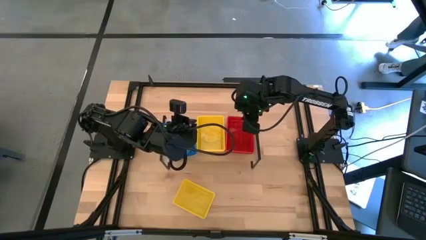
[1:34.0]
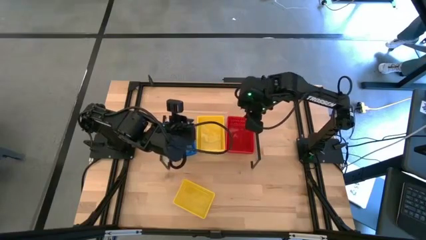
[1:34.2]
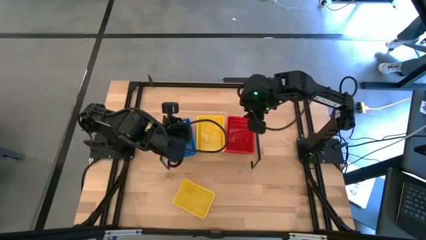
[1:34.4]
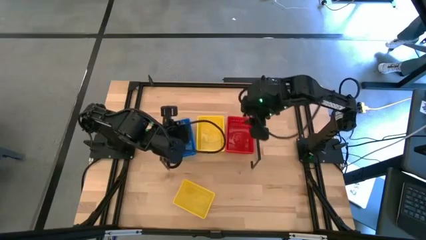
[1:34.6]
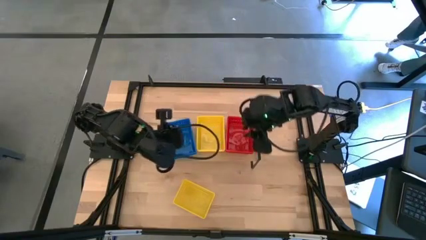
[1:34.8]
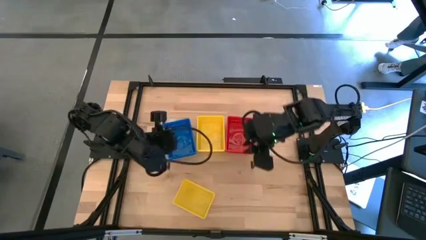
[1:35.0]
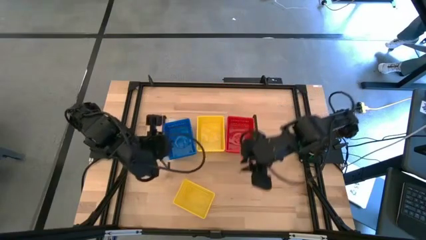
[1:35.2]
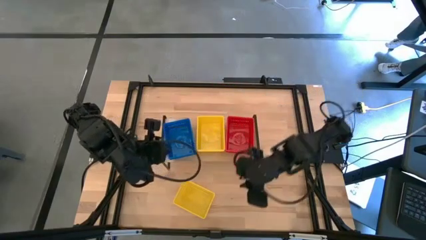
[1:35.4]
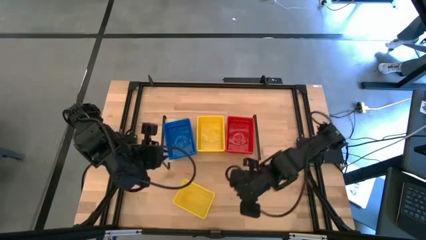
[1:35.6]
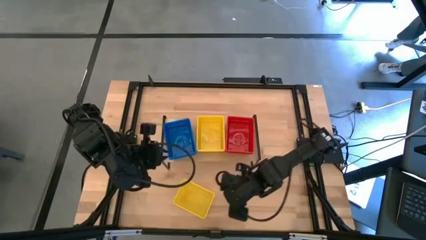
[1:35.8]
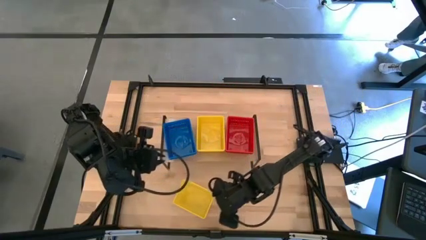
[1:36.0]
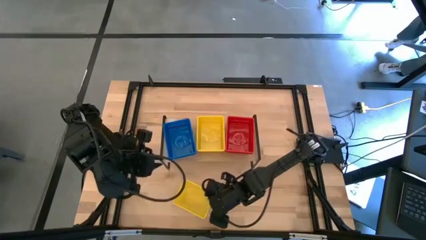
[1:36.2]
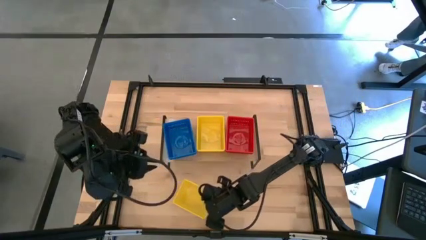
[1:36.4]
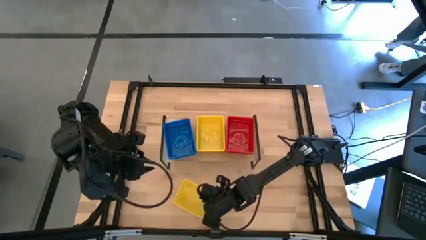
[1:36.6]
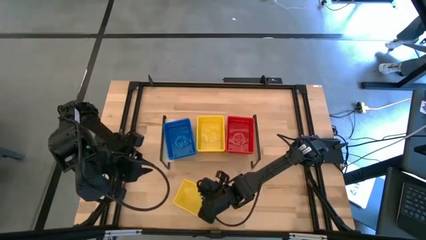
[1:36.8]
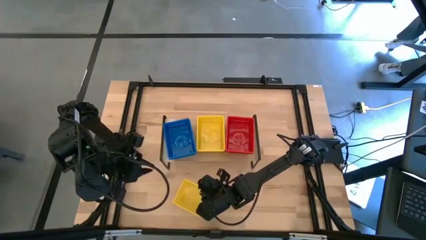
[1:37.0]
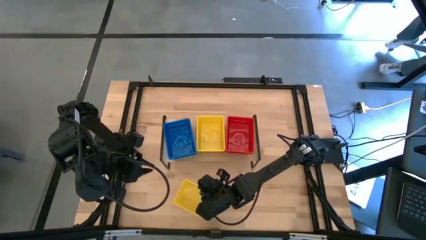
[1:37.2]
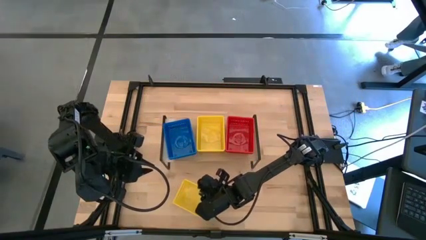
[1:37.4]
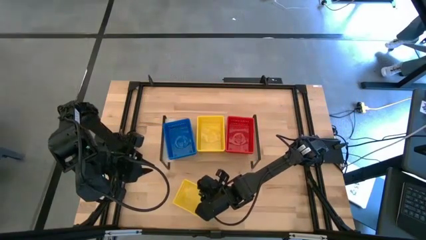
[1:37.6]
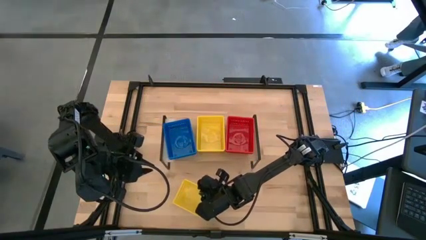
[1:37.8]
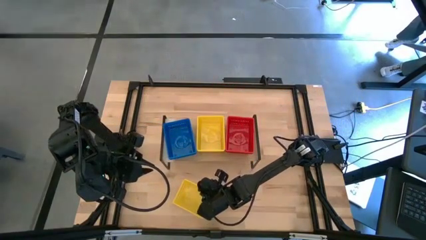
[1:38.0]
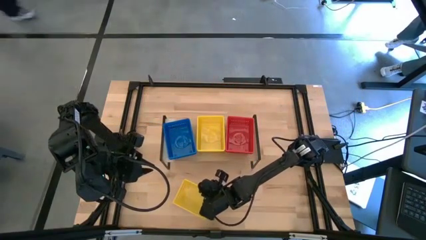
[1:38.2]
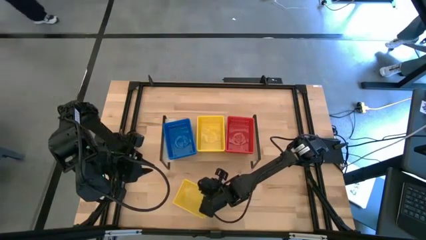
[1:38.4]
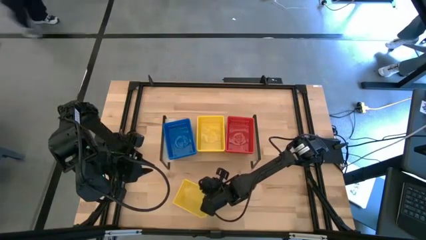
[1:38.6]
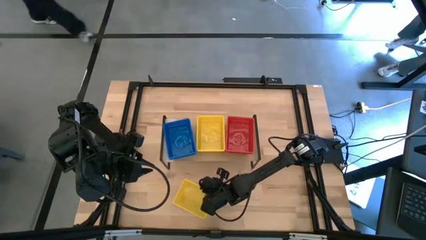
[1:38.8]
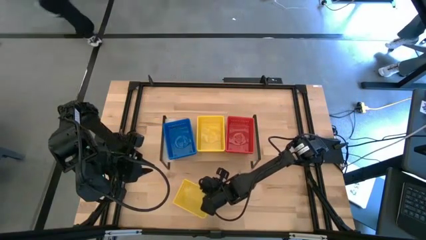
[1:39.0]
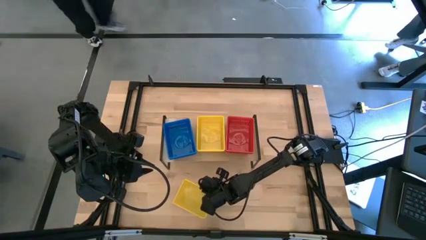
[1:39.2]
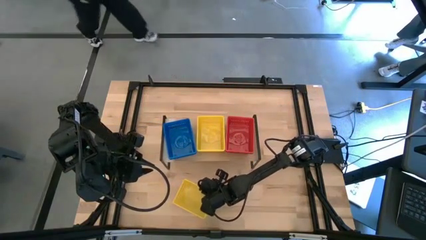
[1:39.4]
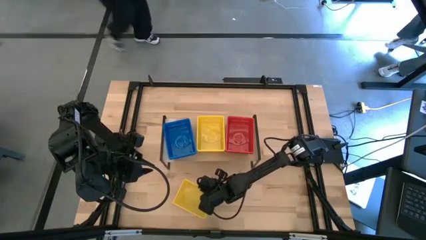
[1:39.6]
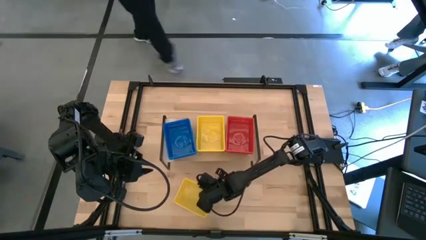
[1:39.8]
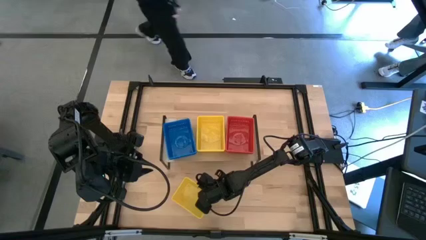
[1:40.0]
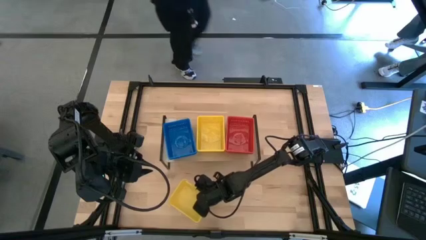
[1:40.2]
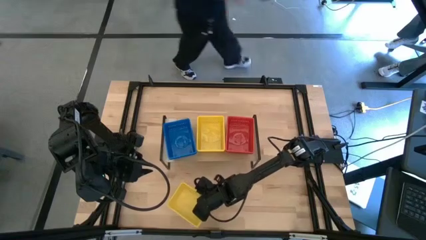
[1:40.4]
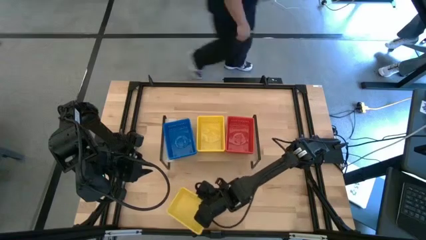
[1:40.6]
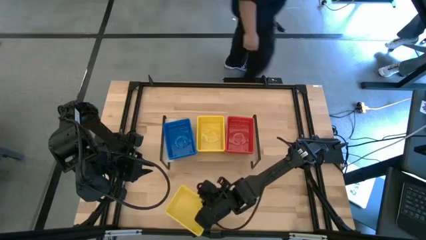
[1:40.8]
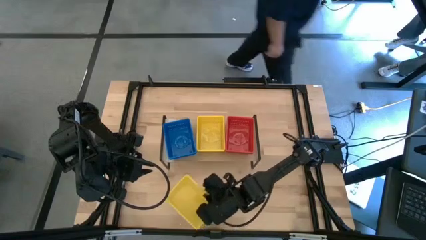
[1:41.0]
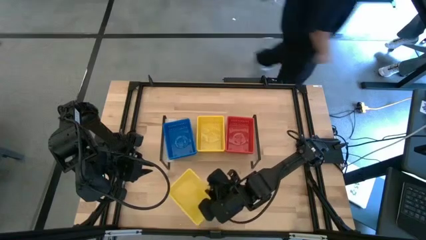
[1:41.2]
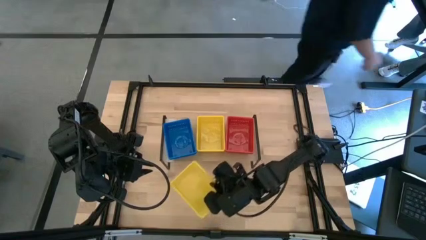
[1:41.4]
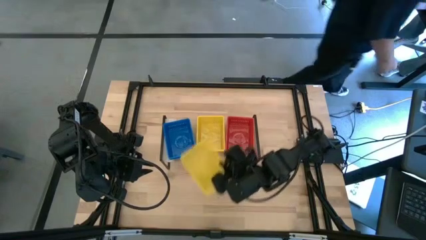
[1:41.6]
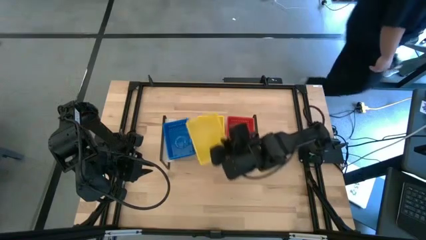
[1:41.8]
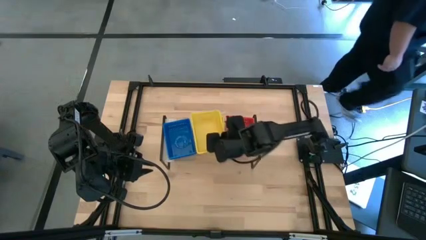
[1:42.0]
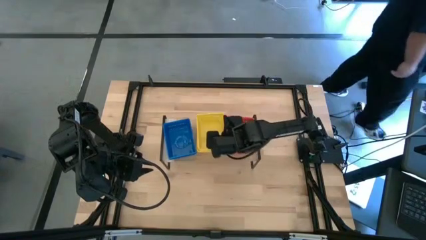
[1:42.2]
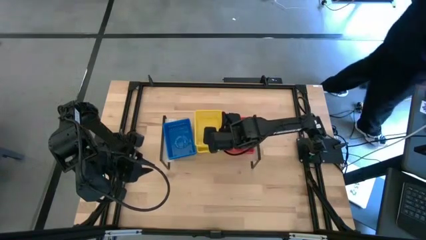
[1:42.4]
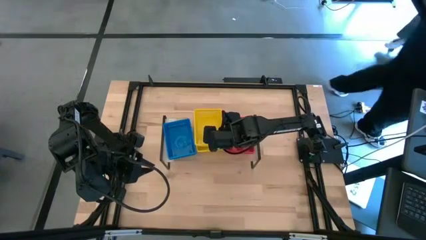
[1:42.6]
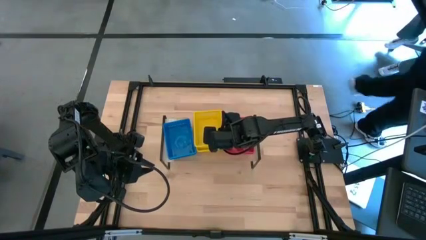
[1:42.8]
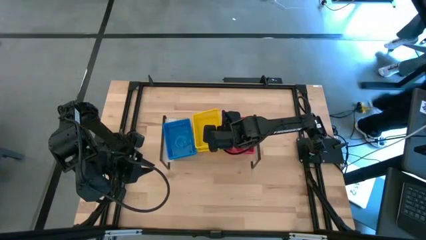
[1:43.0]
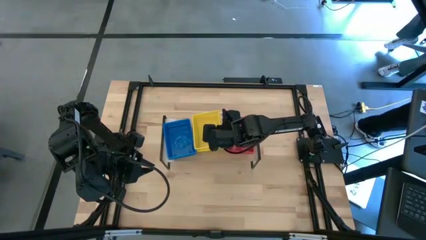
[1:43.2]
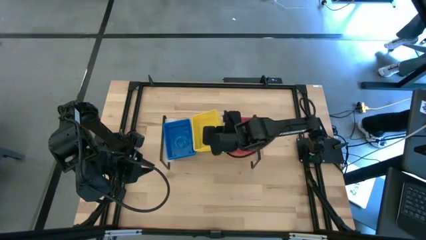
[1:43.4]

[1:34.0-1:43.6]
Task: Stack baskets on shelf by color
Stack the yellow bin on top of the stacked yellow bins on the shelf

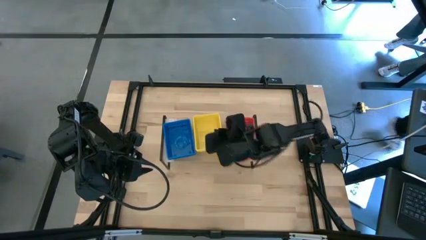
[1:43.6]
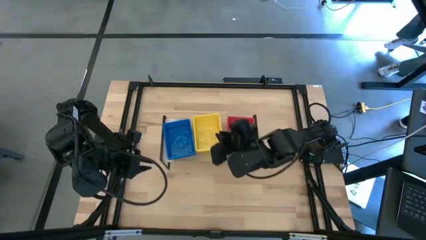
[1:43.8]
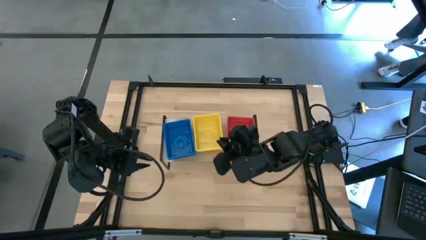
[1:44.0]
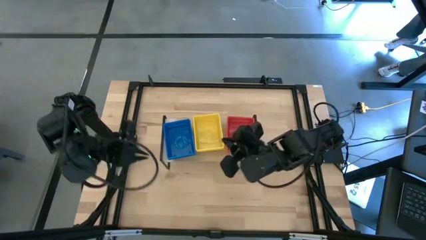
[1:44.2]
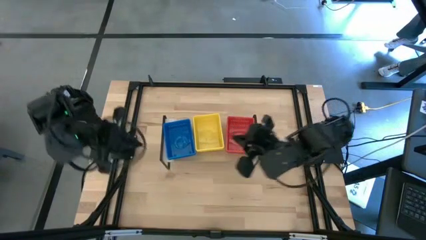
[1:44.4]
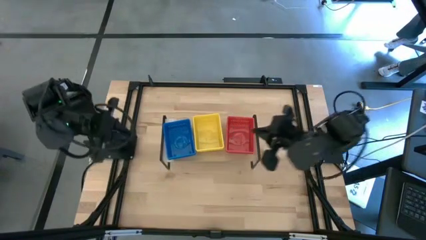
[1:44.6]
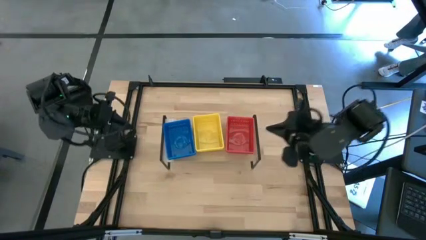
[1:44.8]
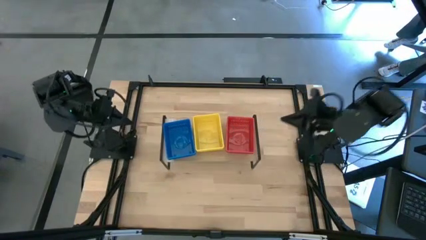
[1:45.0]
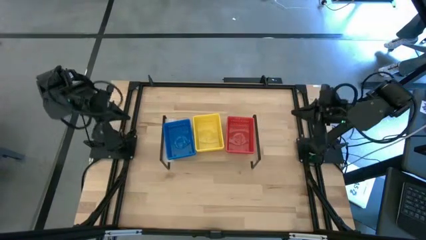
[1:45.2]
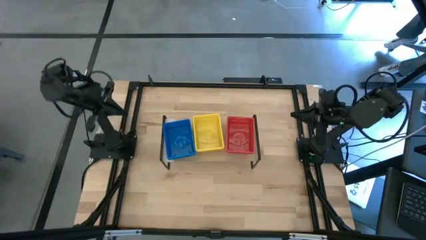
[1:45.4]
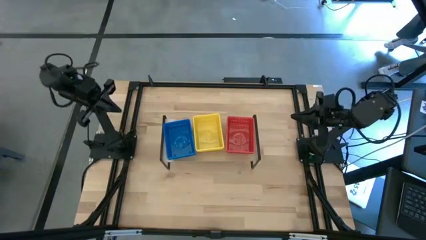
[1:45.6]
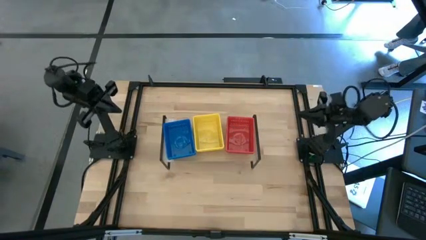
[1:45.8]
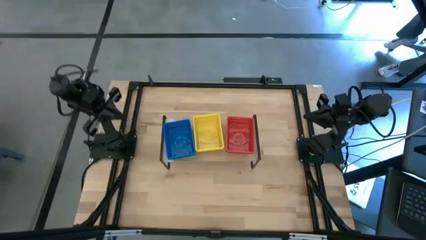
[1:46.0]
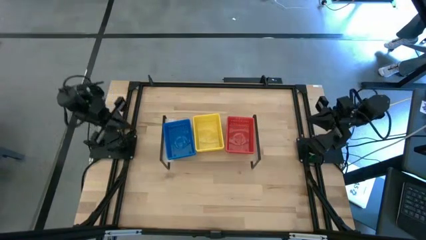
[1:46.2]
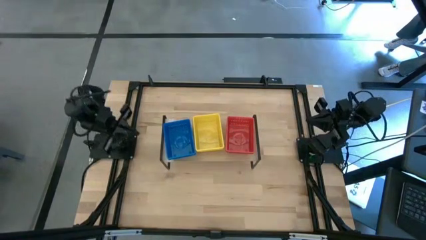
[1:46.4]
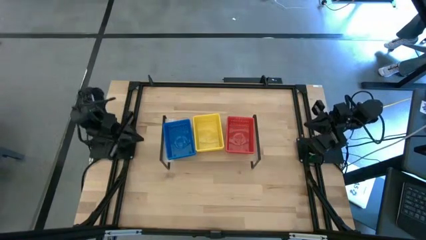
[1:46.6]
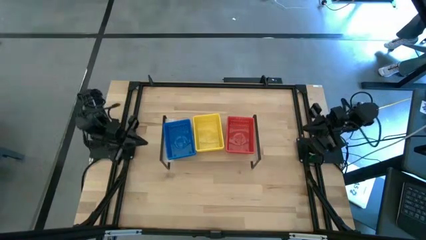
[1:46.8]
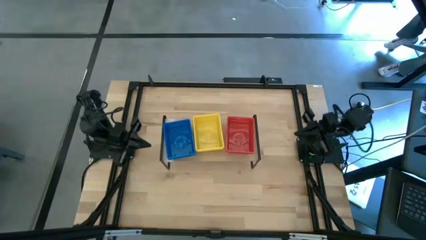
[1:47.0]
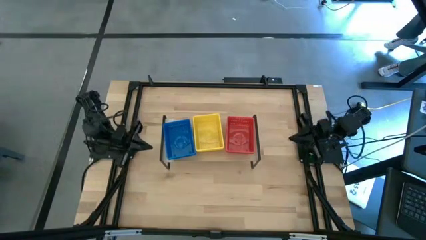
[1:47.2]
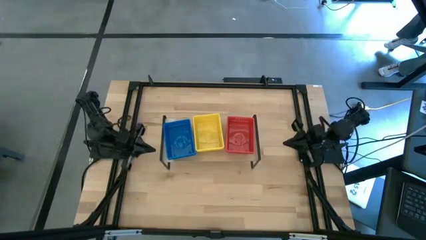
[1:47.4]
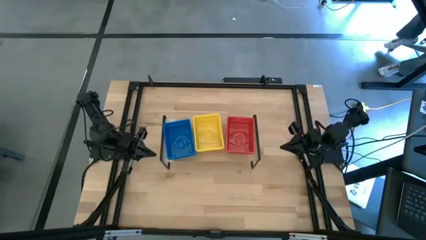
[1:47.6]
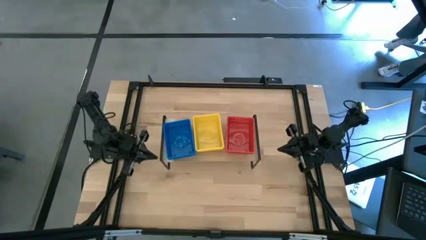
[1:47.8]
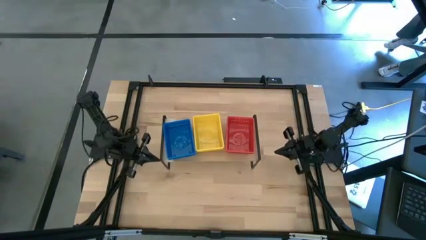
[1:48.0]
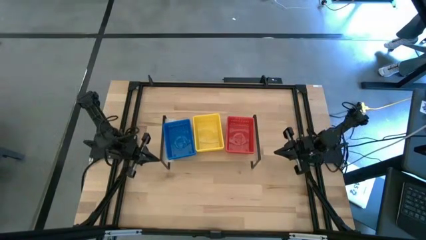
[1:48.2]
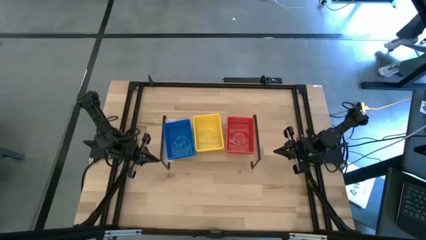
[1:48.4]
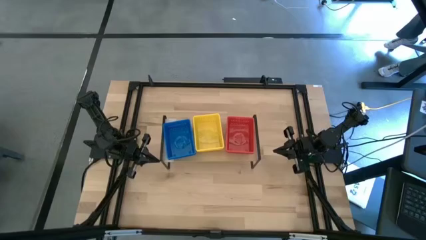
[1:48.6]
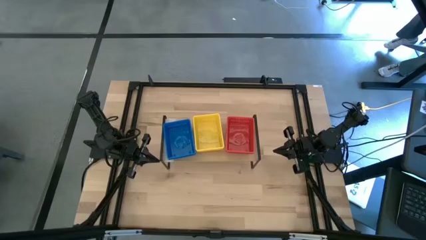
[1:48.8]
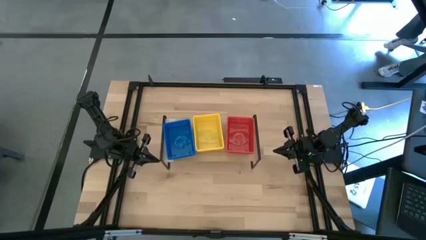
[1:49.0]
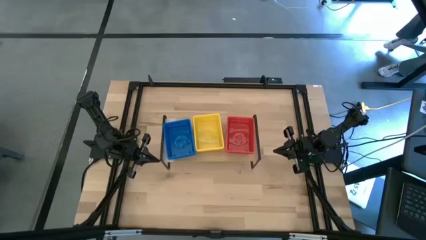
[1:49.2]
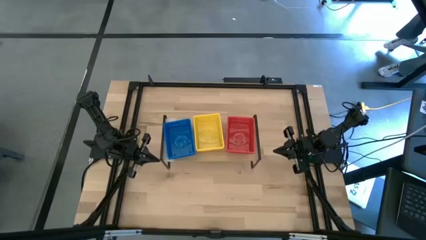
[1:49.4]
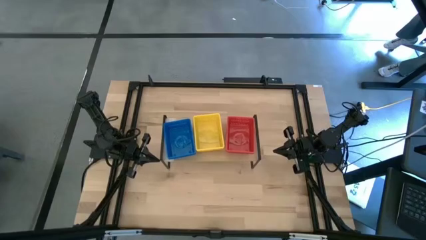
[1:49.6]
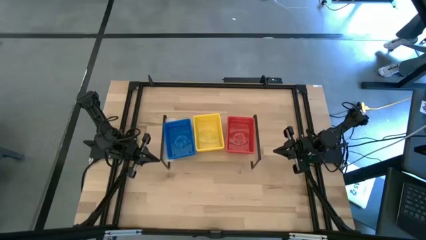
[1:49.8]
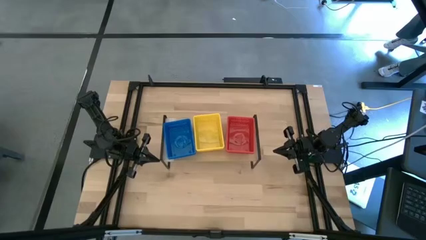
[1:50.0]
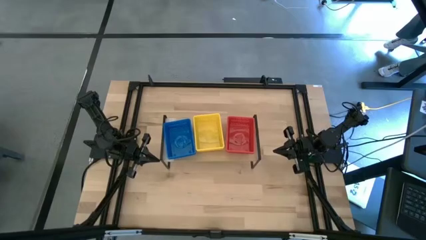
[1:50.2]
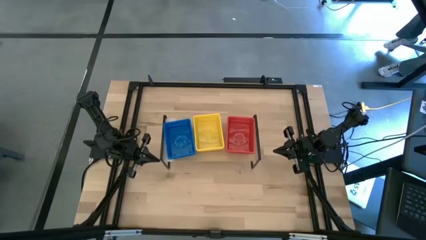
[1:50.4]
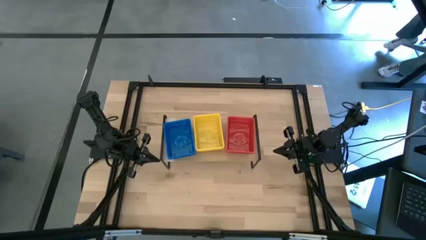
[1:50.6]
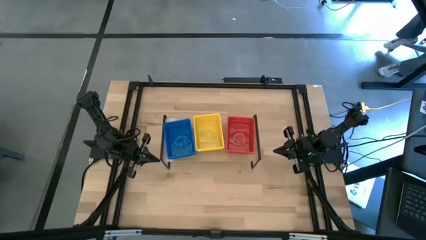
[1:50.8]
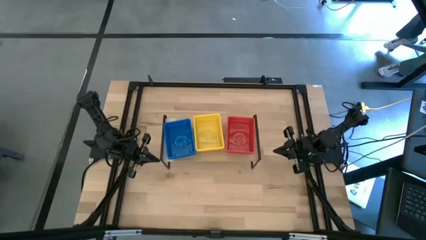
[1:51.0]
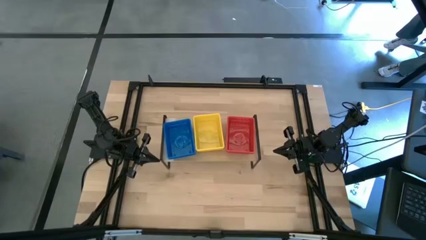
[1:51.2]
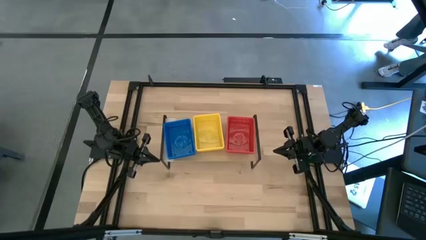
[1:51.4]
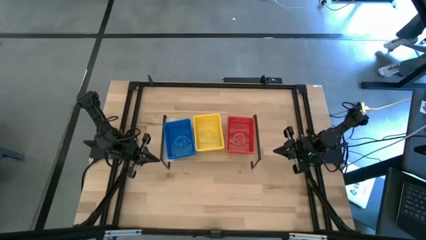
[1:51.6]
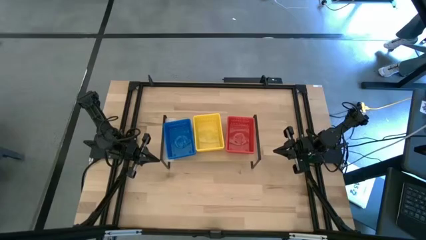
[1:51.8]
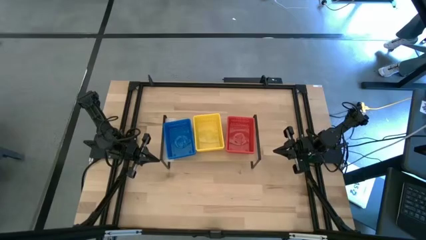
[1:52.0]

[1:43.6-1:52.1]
Return to Home Position
